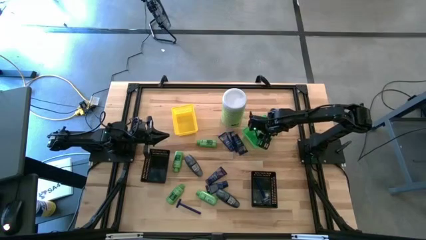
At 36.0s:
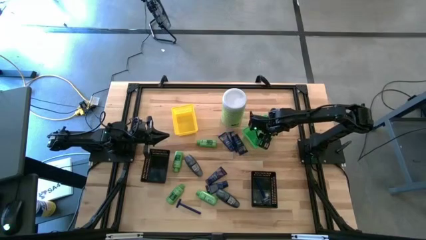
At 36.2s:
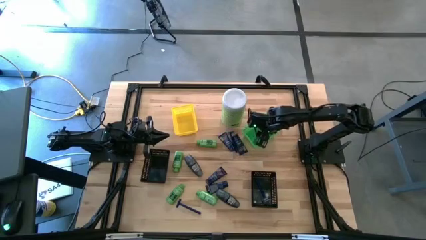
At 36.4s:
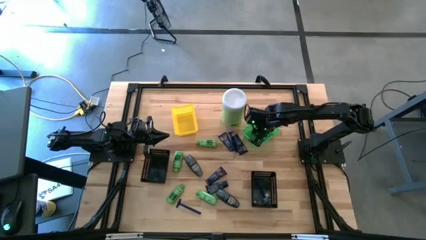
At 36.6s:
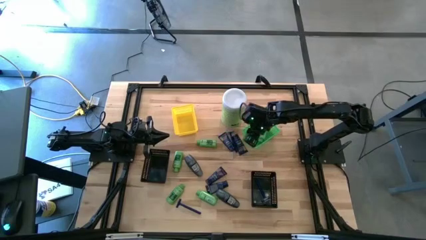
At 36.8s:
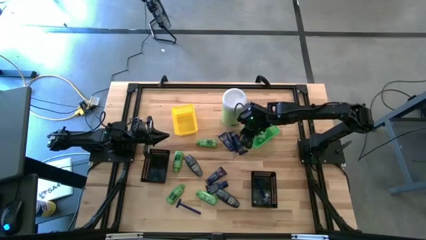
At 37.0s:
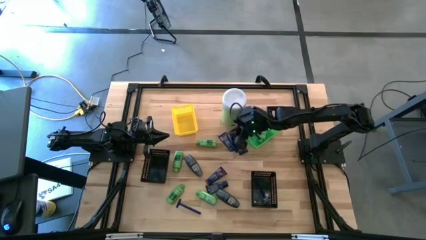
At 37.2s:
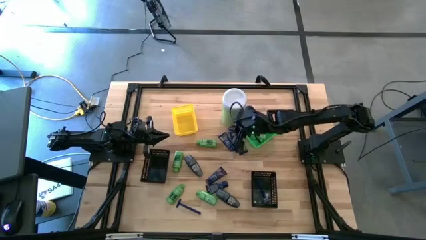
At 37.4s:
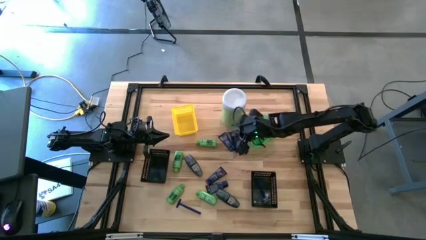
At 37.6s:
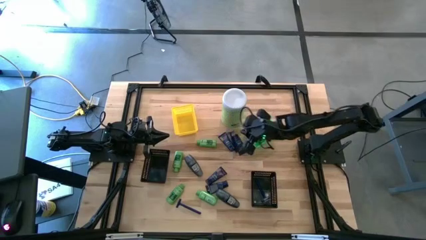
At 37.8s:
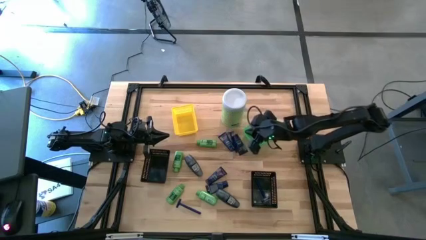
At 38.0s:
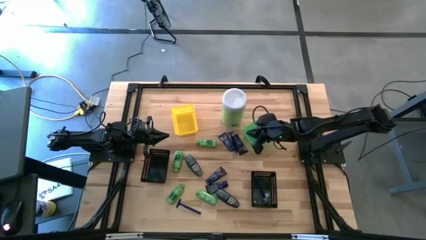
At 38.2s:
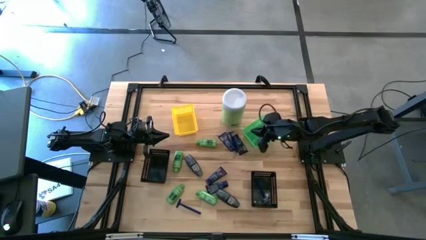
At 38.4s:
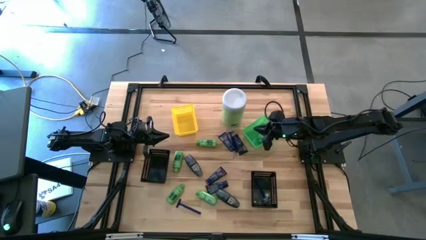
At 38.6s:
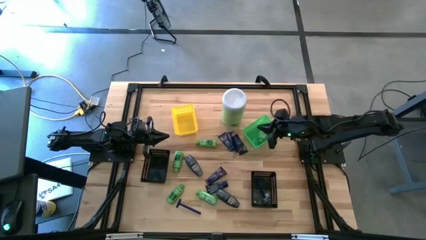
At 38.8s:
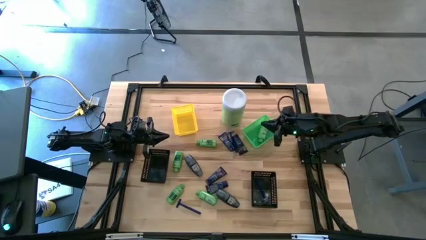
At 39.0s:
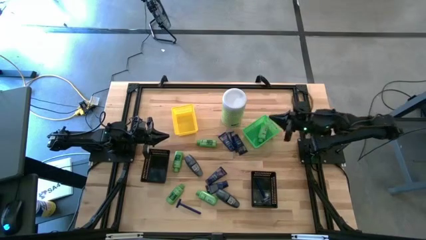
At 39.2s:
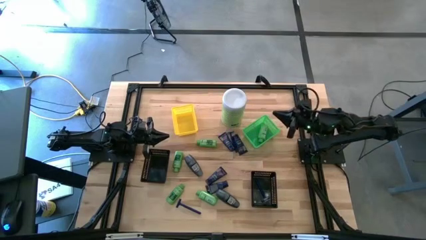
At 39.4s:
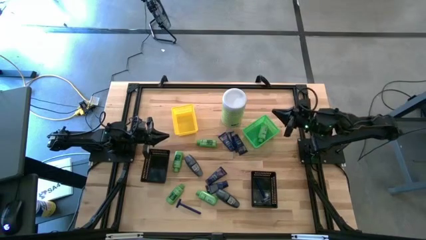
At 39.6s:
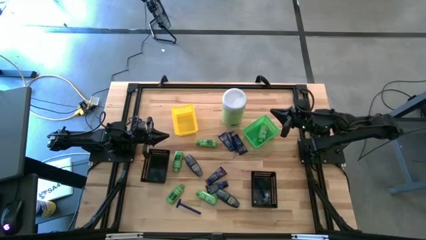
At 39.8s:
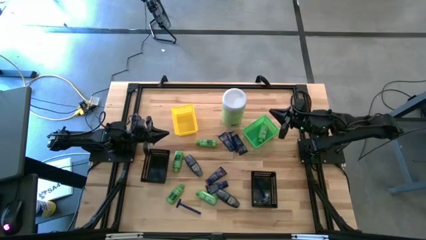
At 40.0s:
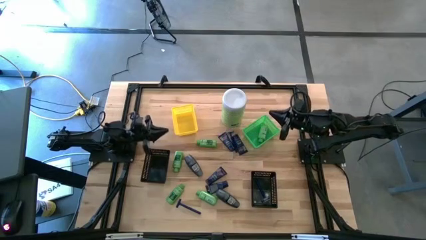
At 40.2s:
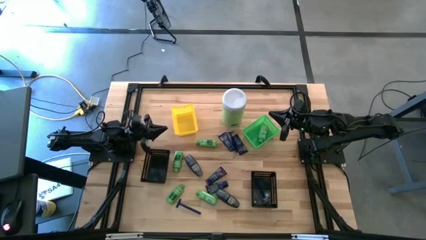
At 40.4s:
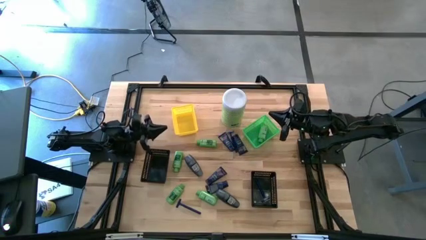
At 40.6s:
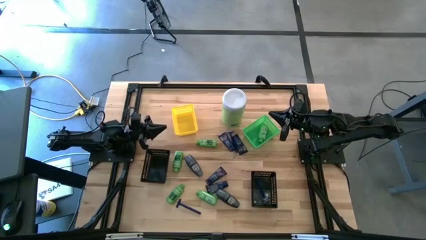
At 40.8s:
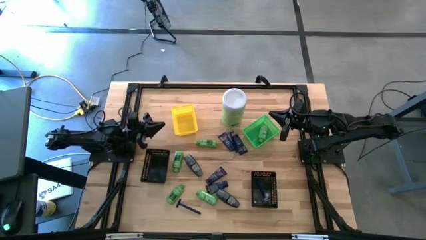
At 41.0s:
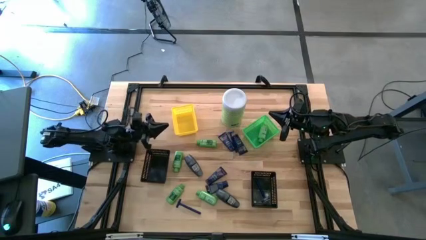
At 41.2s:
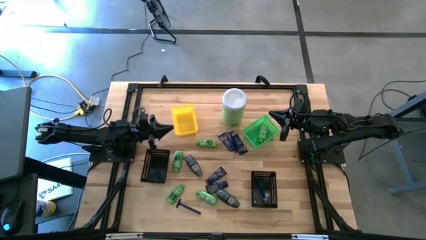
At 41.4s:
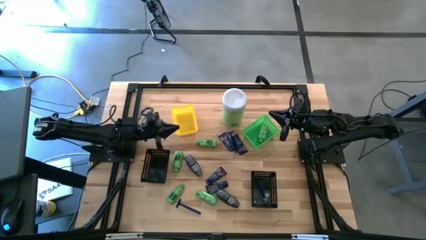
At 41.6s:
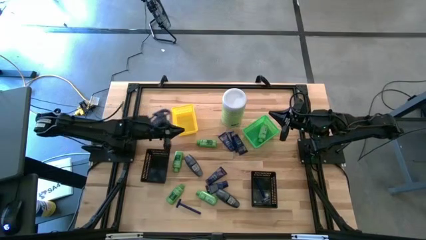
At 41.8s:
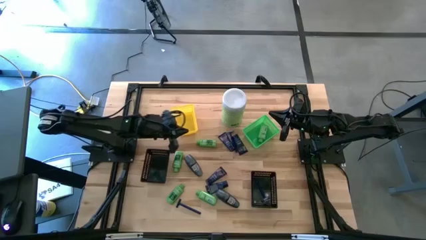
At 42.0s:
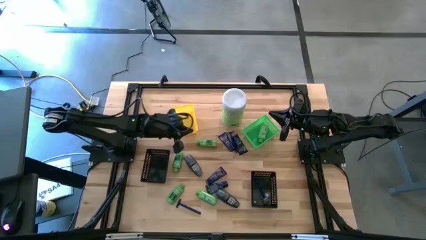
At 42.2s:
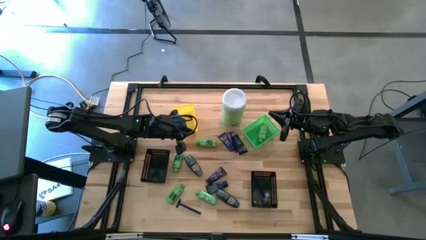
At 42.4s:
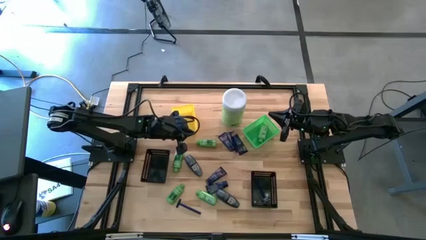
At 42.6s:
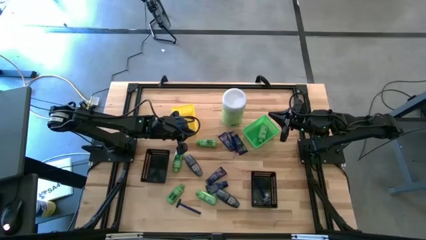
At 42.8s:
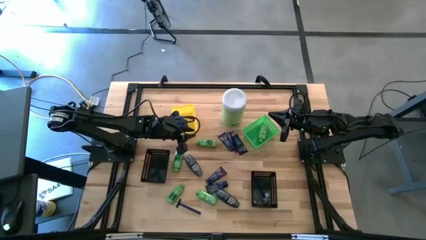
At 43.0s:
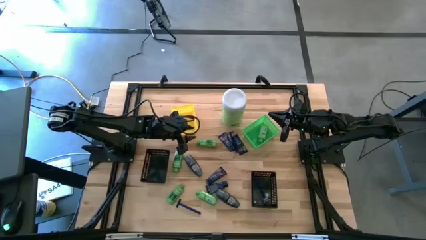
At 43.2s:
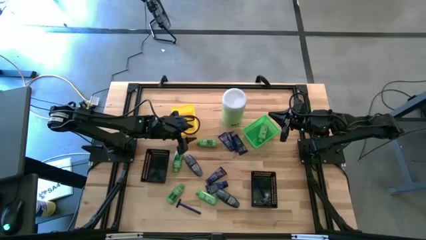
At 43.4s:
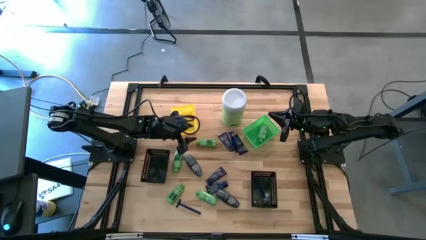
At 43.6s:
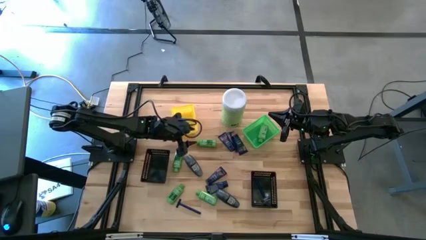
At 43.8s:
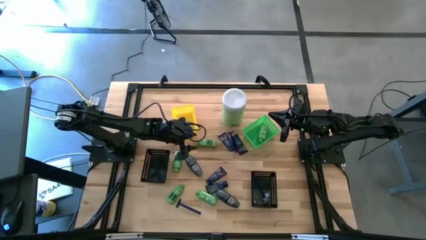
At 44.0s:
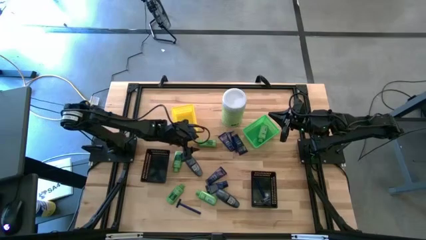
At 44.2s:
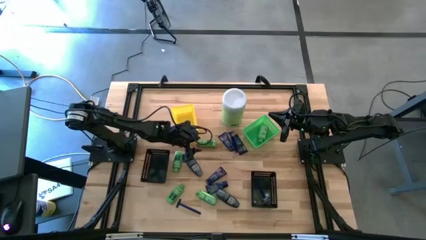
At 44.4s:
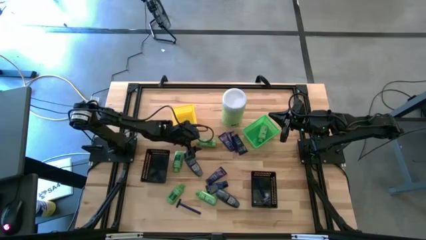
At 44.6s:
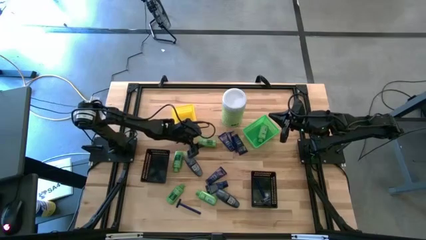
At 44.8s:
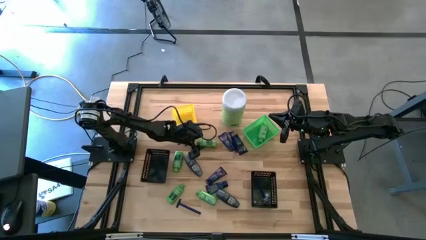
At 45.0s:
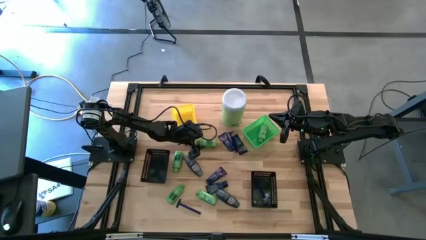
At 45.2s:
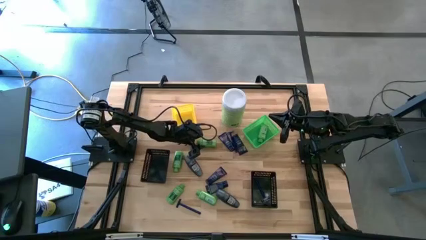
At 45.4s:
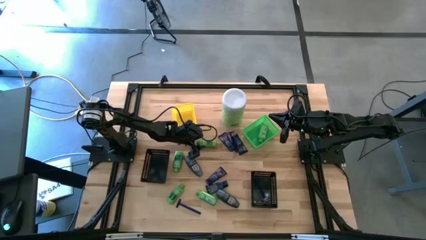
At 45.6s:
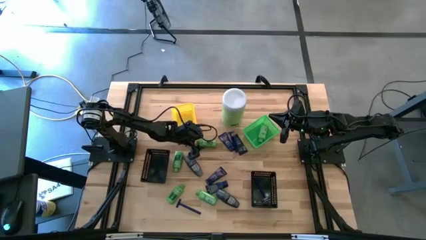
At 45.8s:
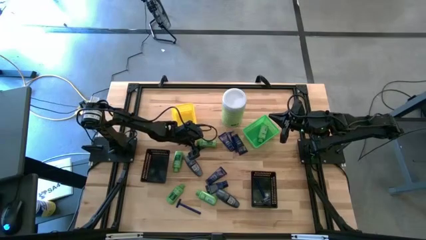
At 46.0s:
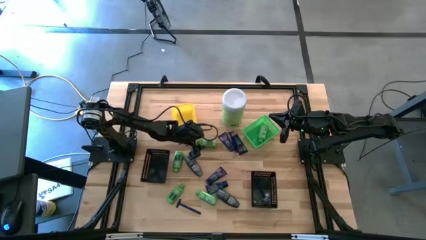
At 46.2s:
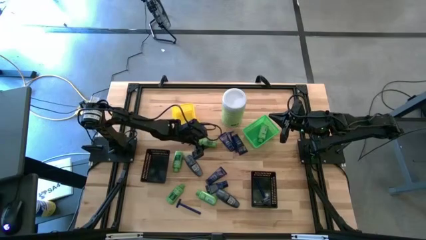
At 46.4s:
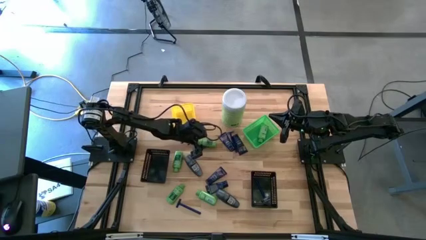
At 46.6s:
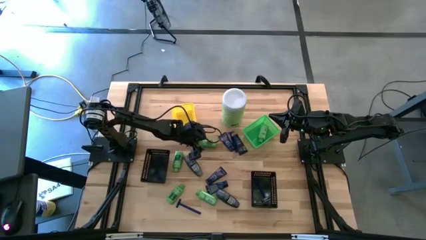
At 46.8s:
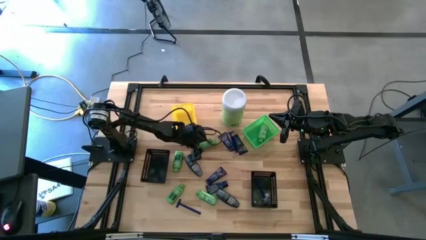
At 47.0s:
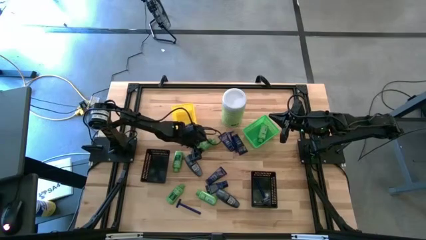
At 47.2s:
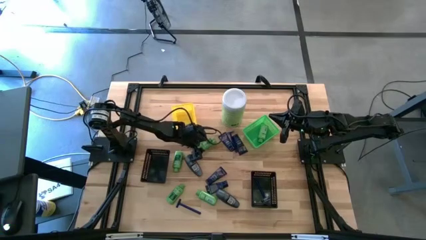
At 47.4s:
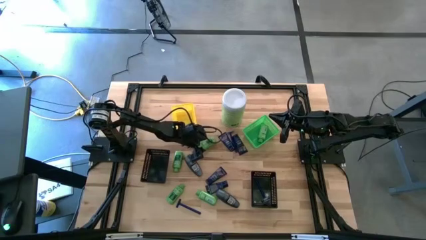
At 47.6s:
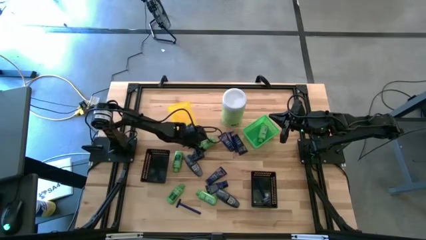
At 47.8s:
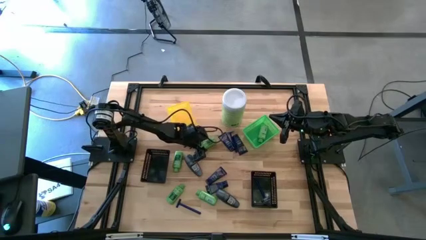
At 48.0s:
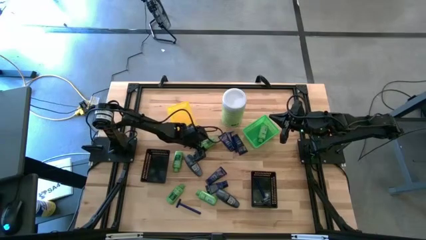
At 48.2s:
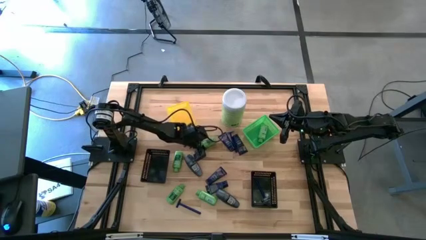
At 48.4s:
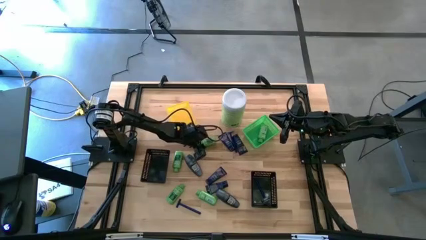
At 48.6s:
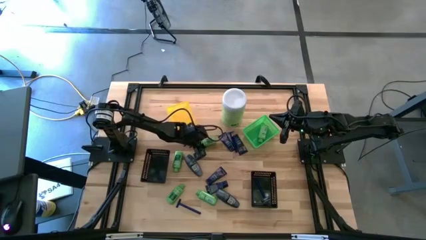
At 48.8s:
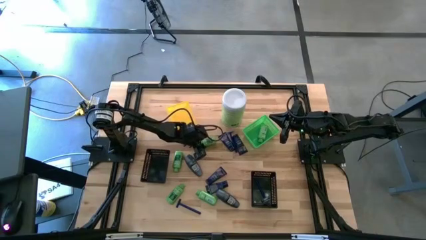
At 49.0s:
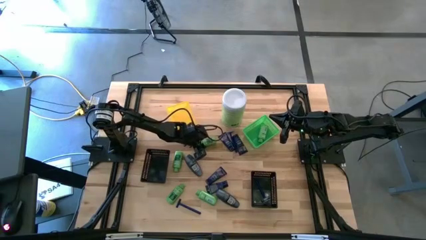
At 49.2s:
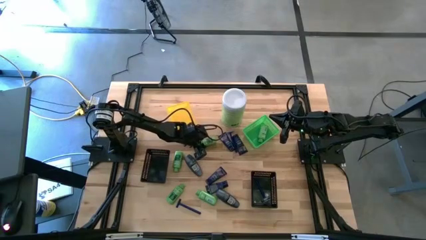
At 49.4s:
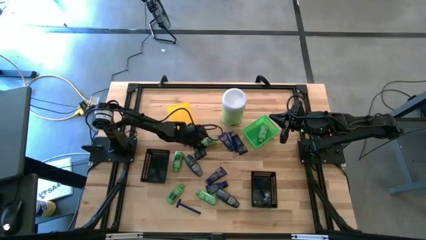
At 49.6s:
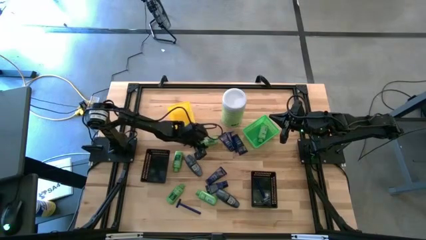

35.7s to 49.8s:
Task: Pick & Place Travel size toiletries
Put the shampoo bottle bottle into the green bin

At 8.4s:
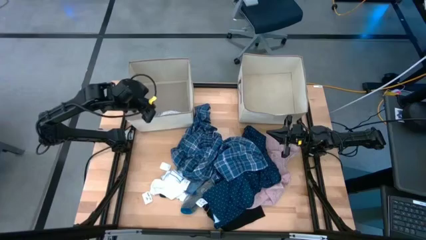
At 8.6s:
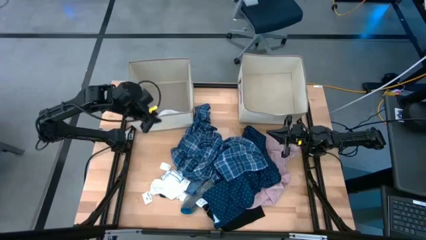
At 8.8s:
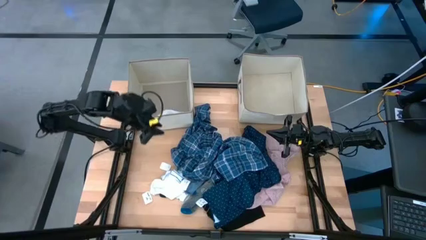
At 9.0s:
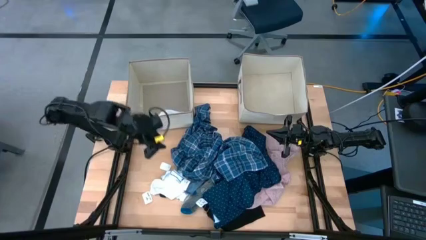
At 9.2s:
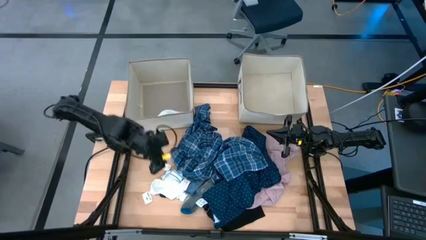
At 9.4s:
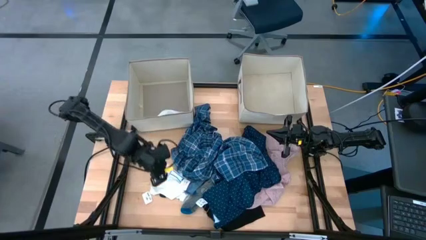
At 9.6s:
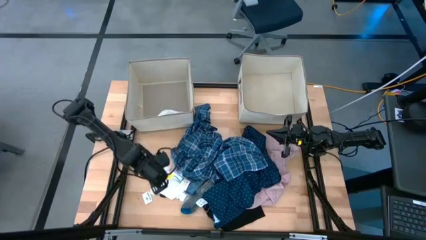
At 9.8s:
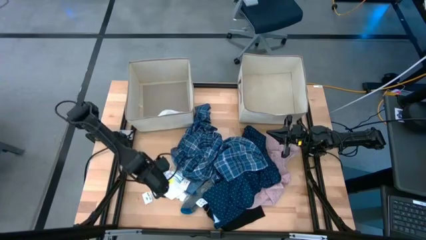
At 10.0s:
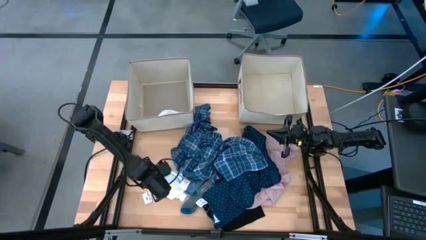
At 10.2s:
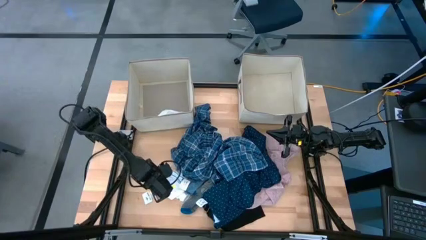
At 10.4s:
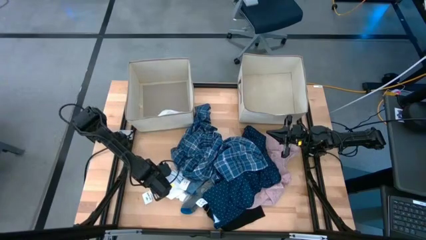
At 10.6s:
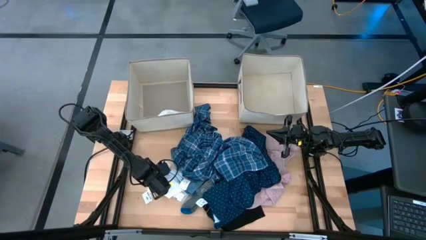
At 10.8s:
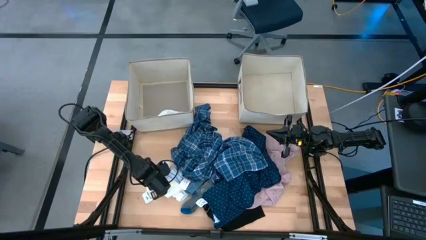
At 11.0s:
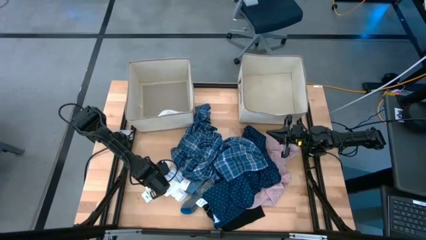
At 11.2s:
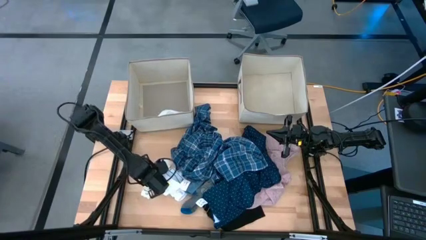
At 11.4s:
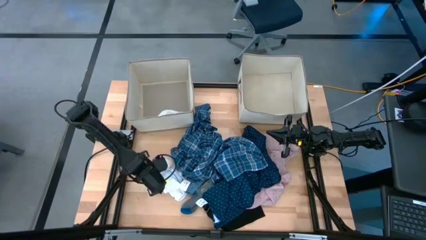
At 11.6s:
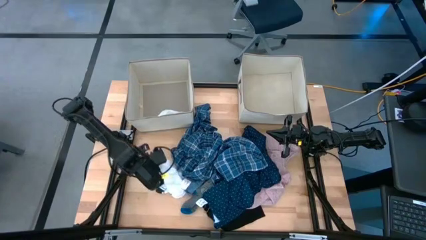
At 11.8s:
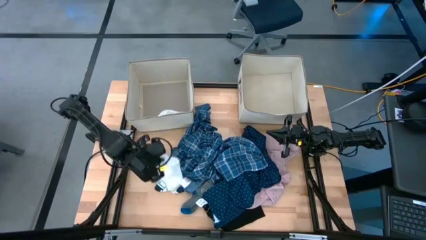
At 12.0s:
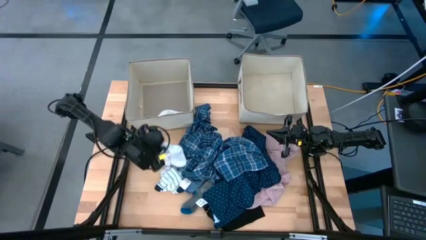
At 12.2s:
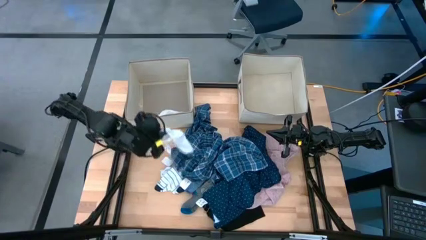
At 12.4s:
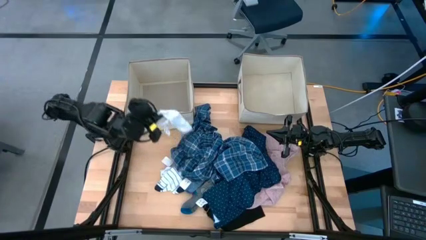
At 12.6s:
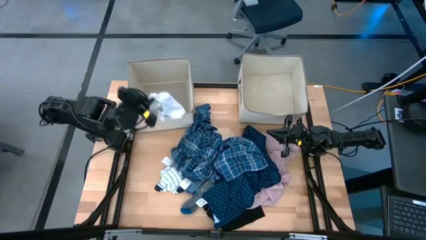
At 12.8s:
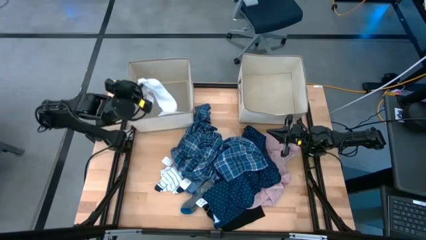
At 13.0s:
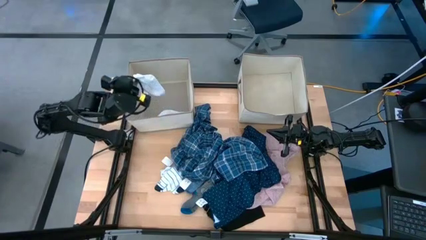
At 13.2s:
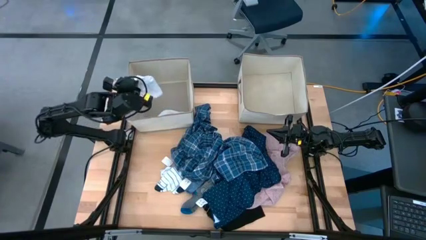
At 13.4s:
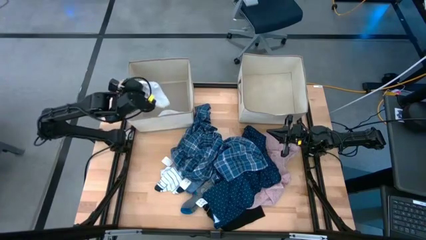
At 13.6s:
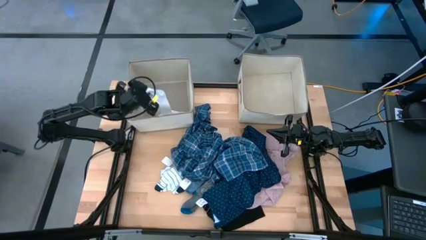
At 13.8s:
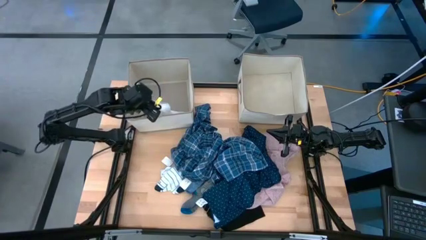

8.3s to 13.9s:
Task: Sort clothes
Put the white sock into the left laundry bin
